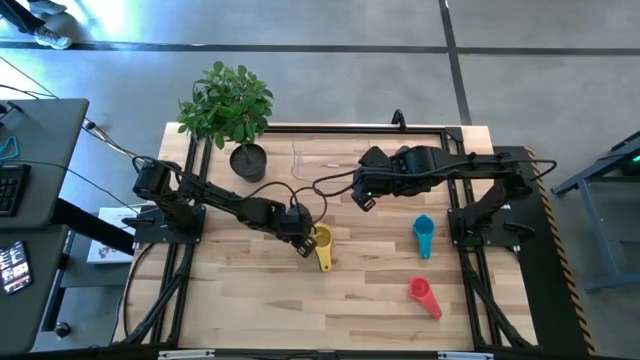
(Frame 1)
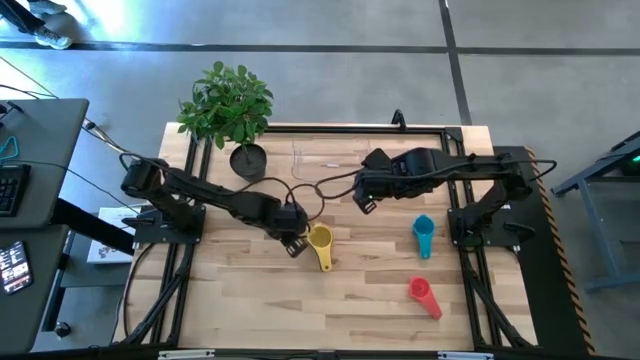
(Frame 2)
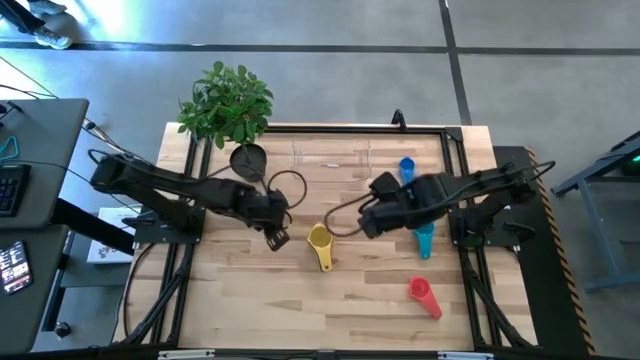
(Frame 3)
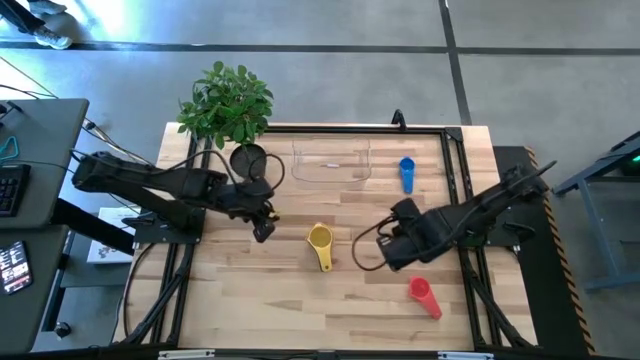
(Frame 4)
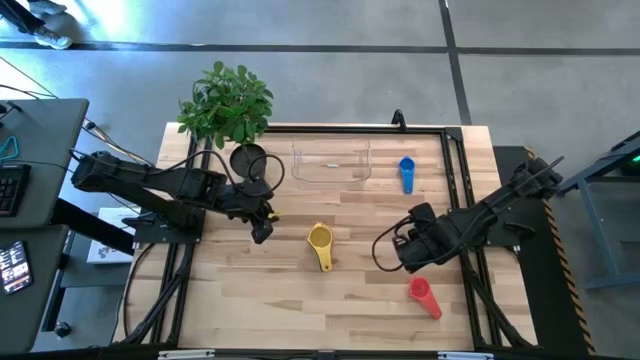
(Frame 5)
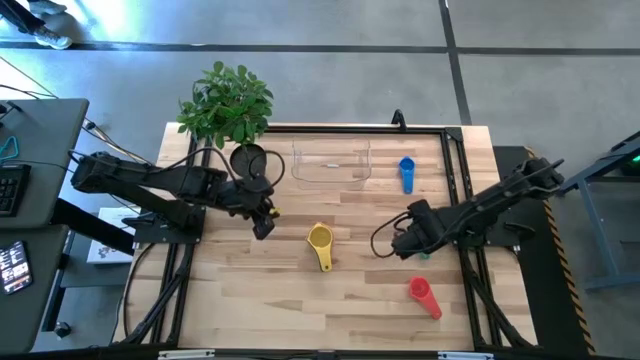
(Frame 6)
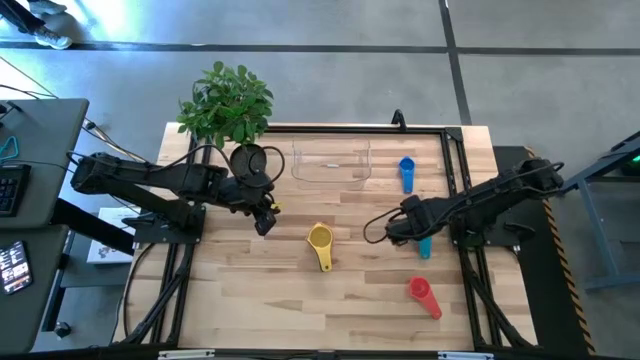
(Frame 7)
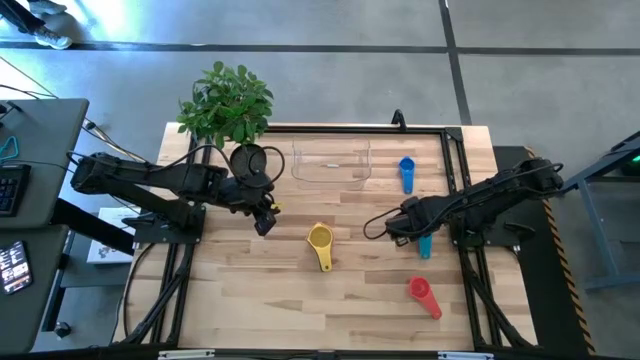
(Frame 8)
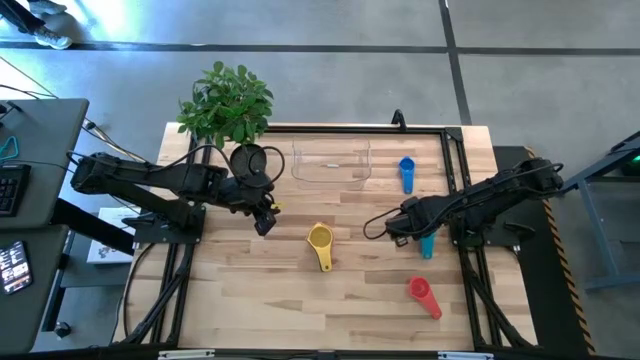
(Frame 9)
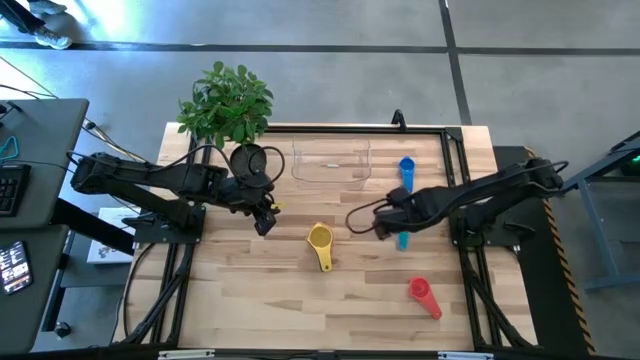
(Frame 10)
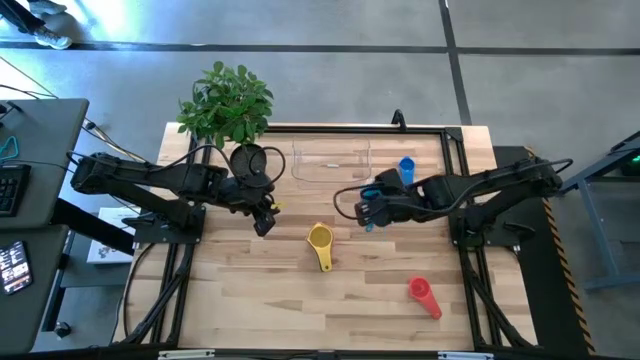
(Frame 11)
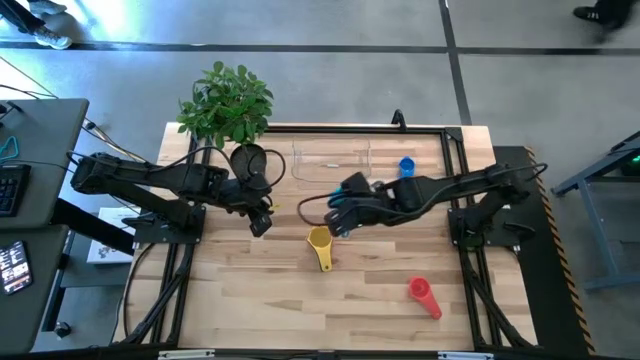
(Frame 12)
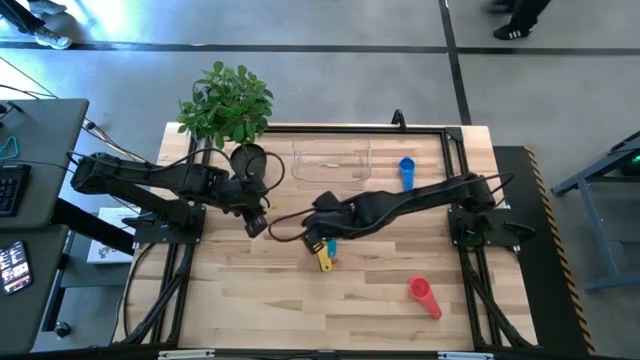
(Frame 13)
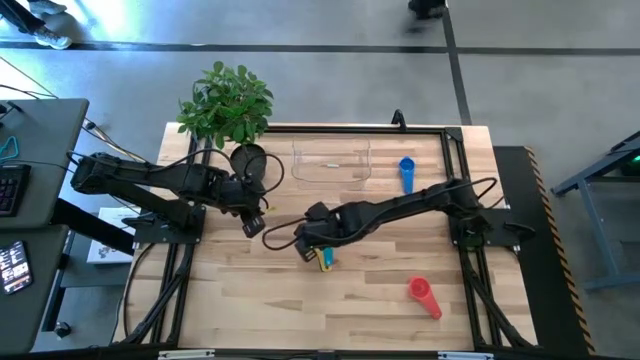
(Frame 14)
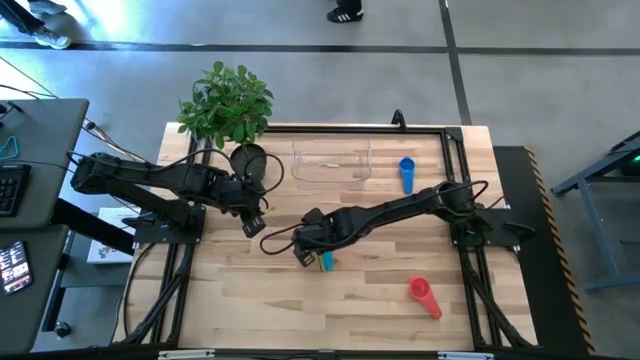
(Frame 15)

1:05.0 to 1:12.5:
Task: Nest measuring cups in basket
Stack the bottom blue measuring cup on top of the yellow measuring cup

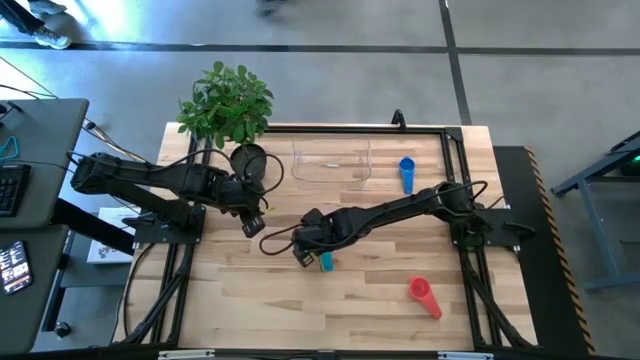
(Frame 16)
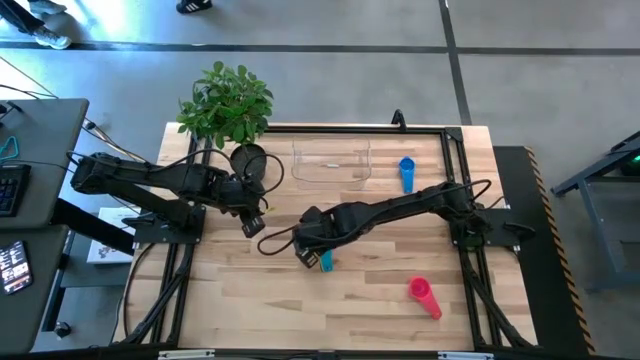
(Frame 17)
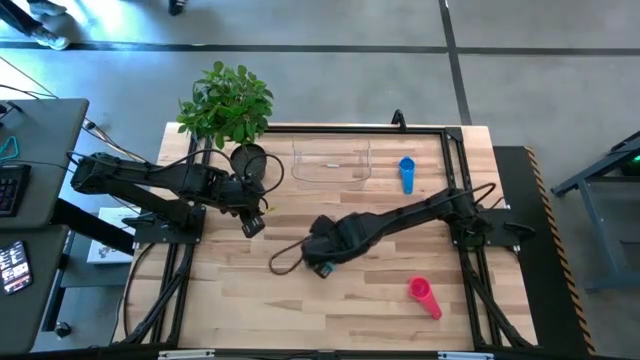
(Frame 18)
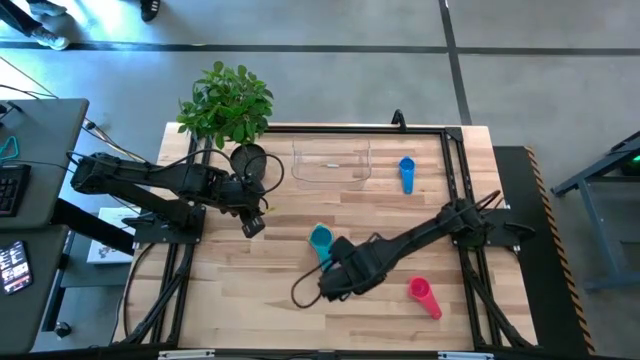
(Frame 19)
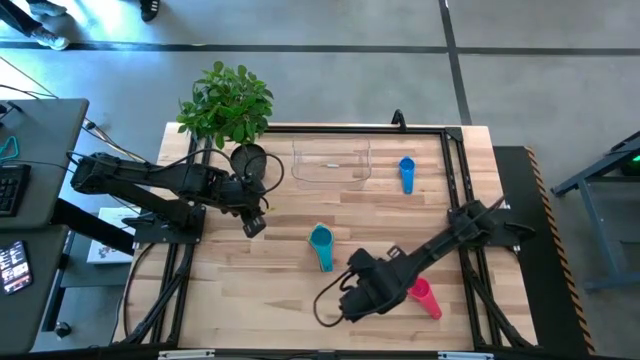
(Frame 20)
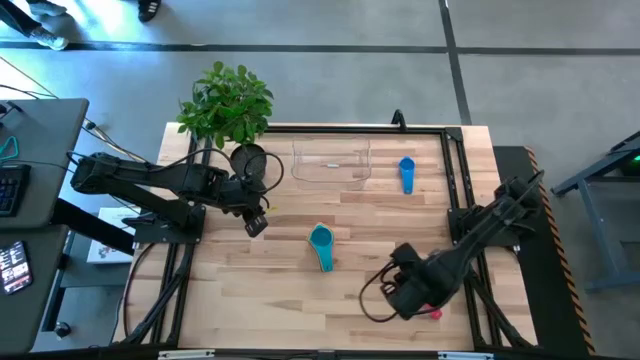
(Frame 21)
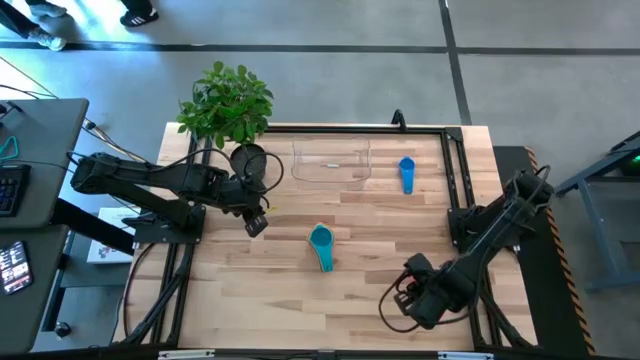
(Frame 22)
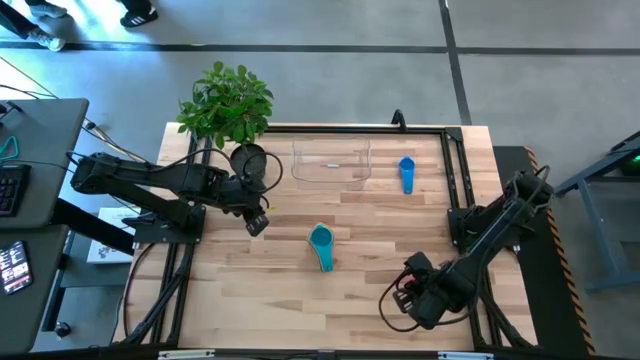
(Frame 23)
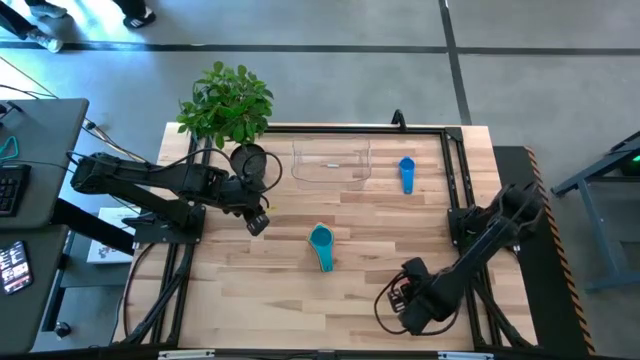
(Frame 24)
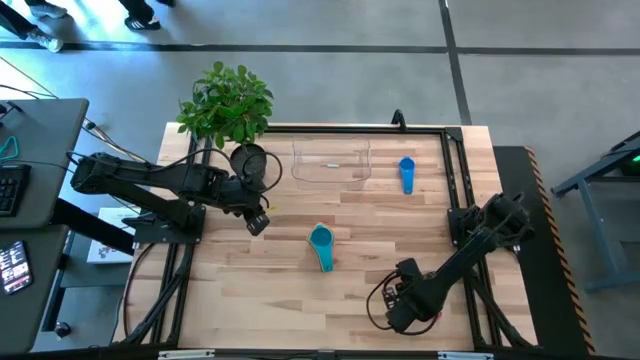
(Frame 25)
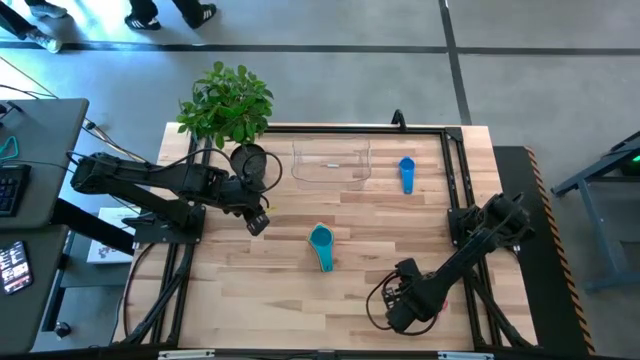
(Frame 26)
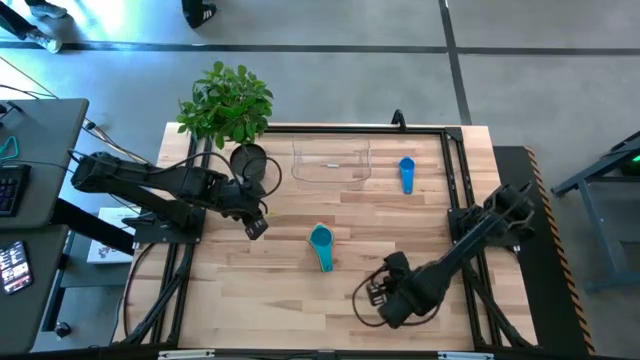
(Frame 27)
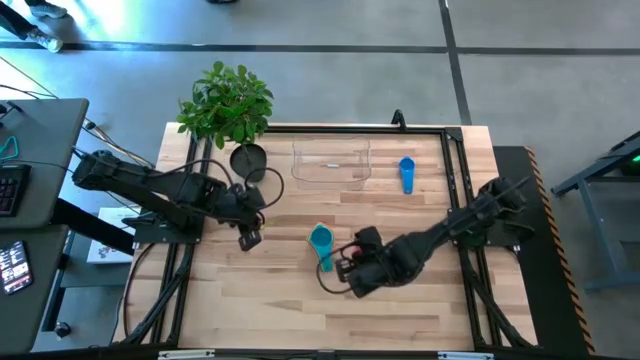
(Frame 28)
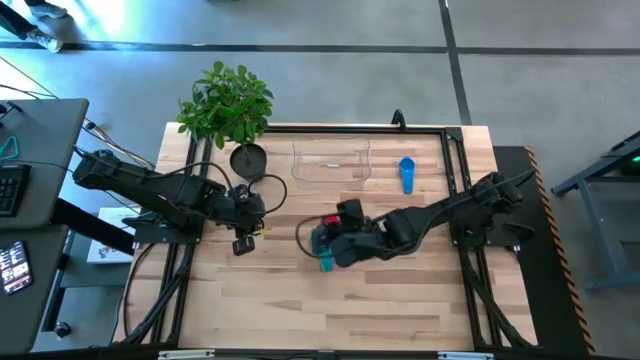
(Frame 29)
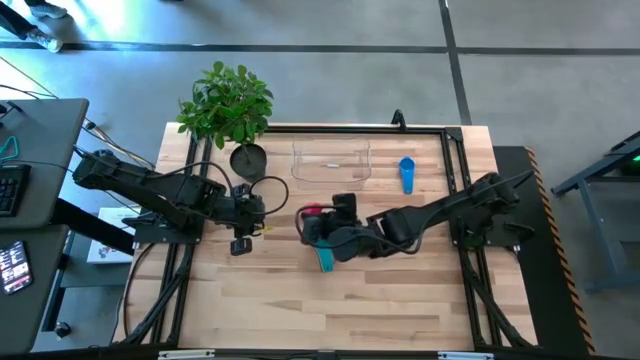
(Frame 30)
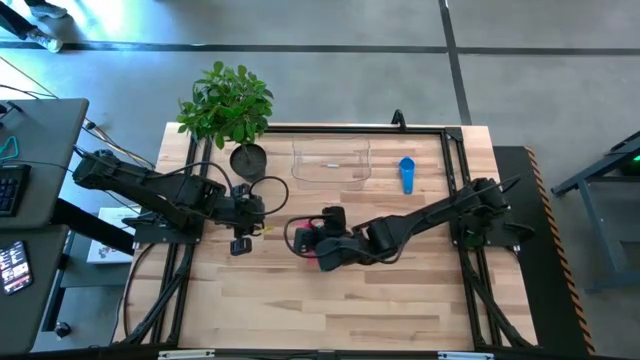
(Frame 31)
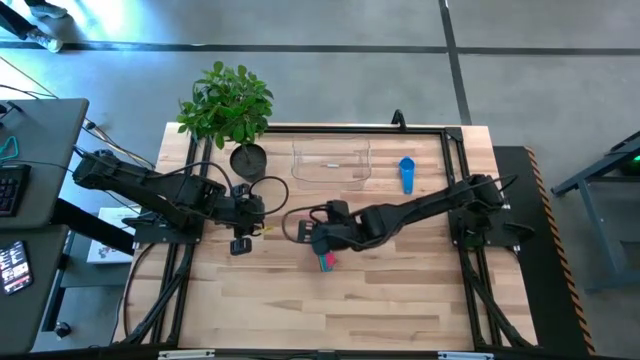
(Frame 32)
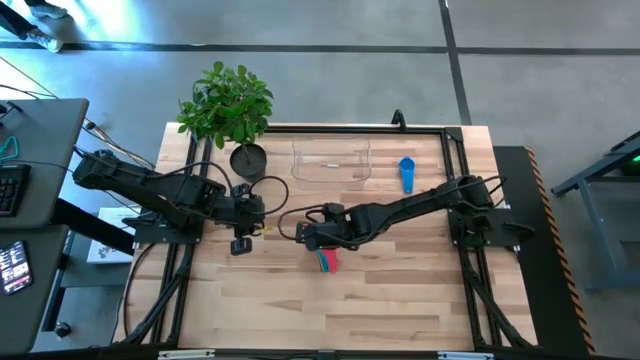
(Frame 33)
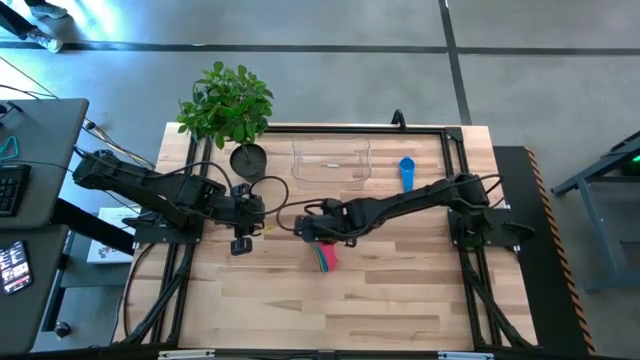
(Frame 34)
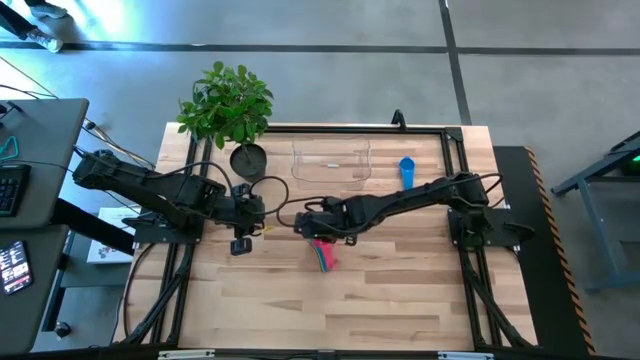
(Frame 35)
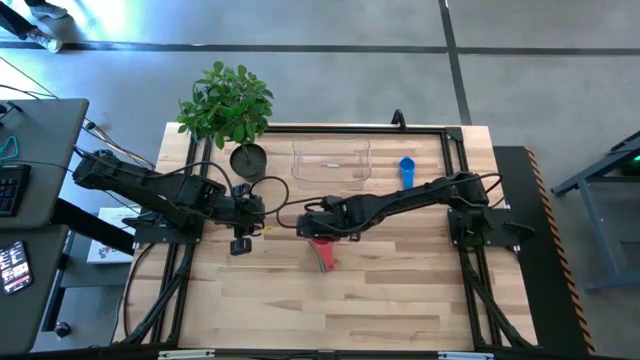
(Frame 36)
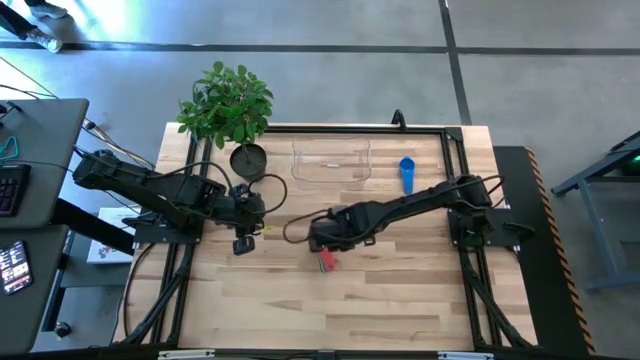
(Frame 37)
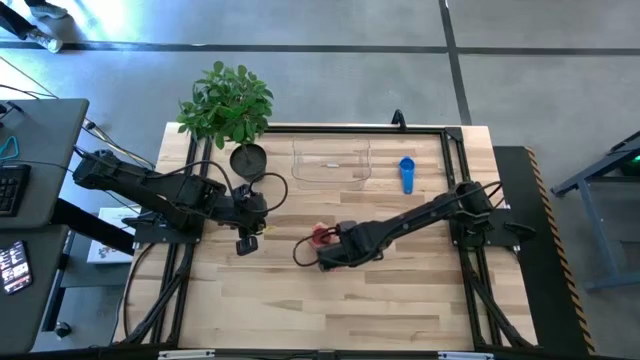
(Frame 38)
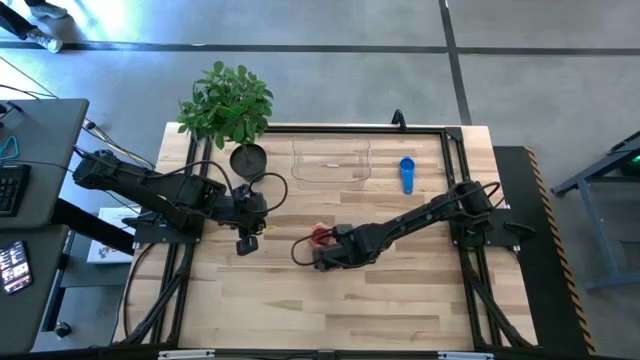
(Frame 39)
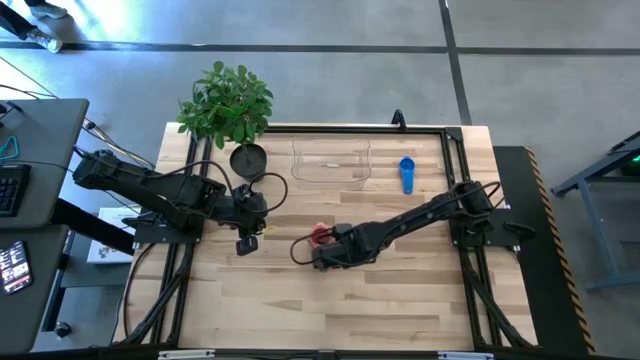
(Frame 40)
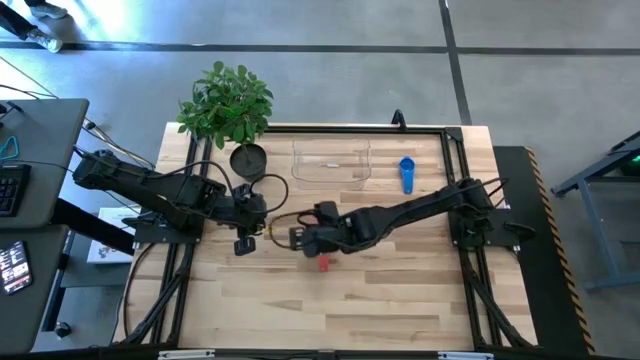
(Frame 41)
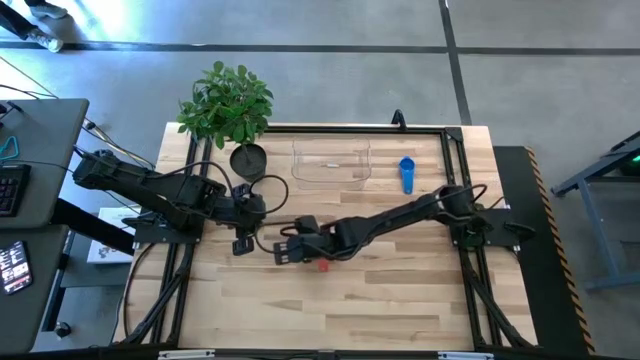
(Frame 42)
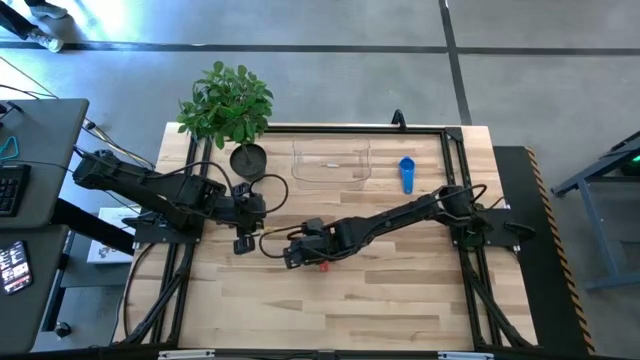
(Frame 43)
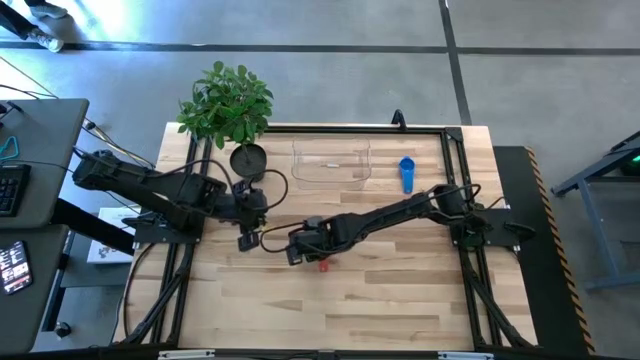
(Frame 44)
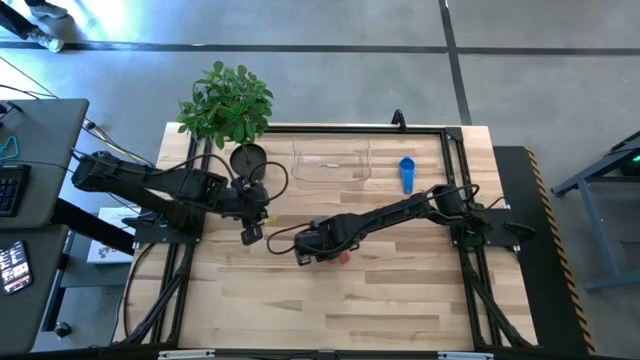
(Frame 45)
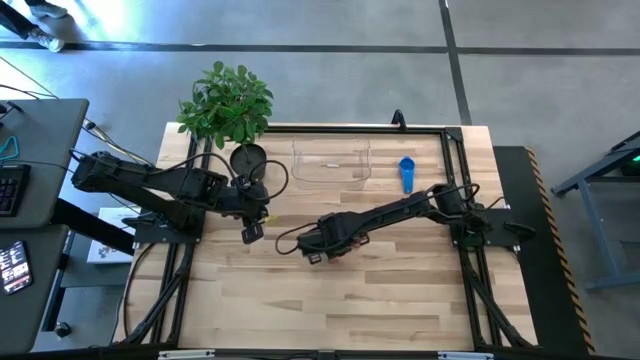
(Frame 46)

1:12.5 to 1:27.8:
Stack the red measuring on top of the light blue measuring cup
